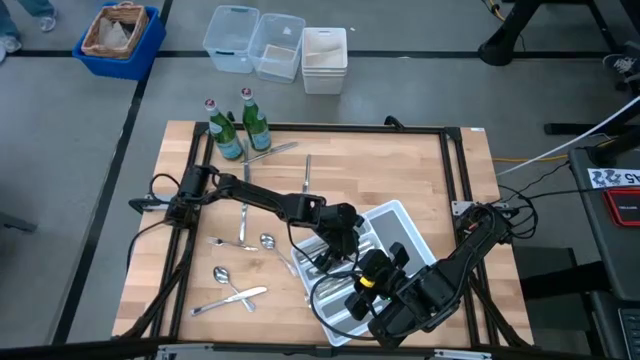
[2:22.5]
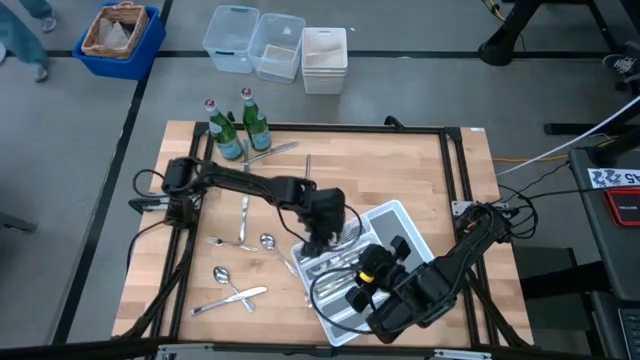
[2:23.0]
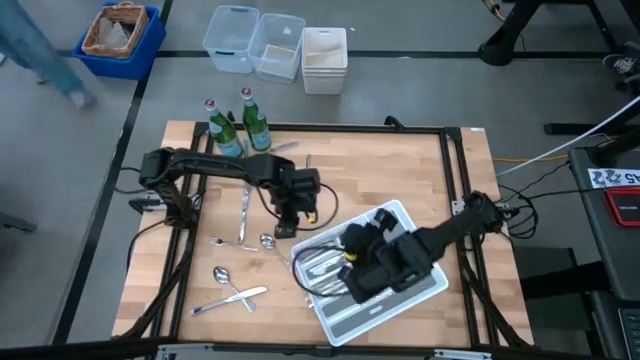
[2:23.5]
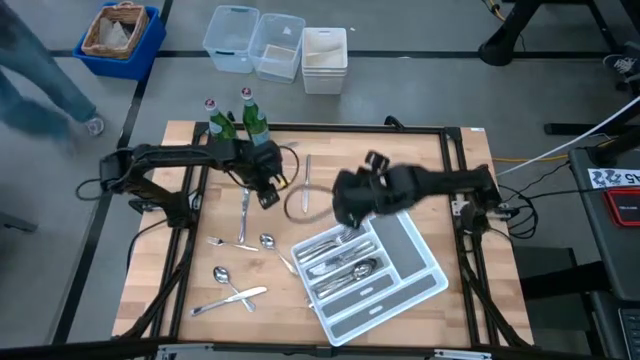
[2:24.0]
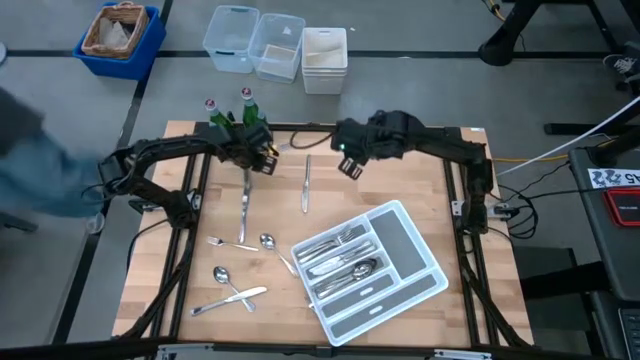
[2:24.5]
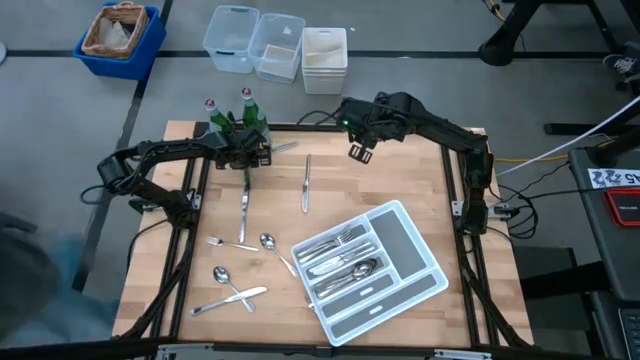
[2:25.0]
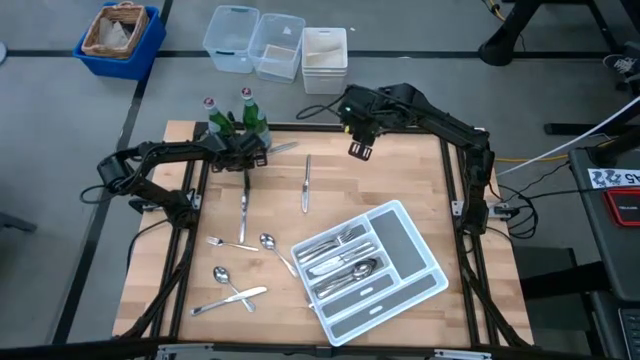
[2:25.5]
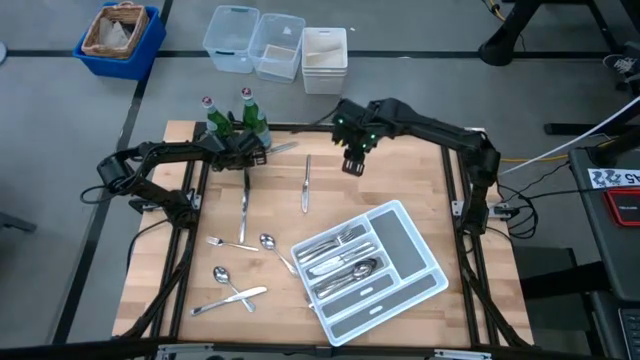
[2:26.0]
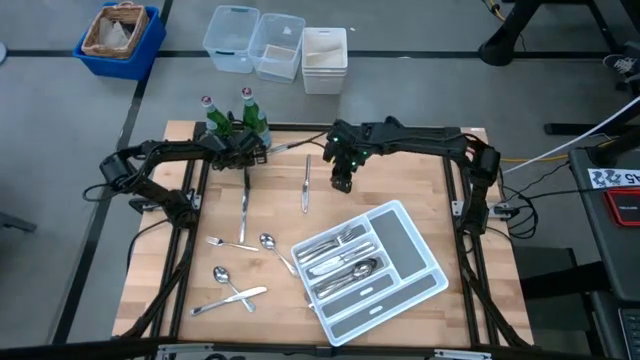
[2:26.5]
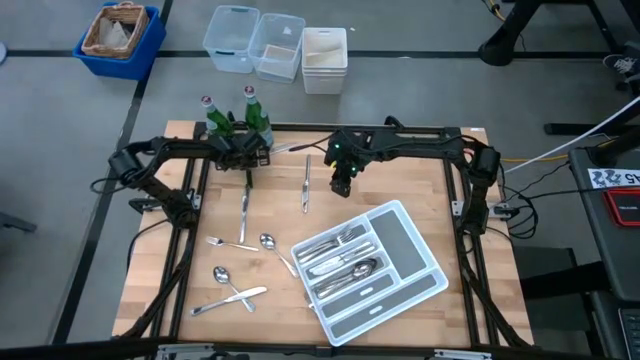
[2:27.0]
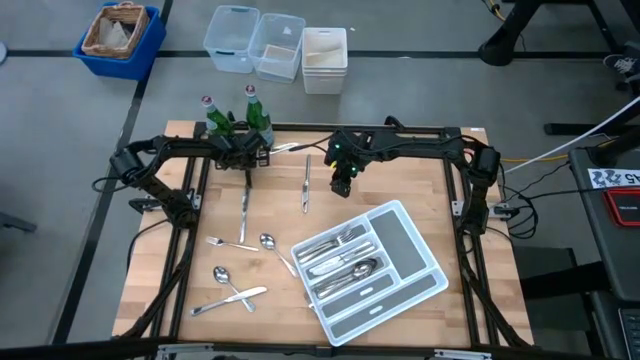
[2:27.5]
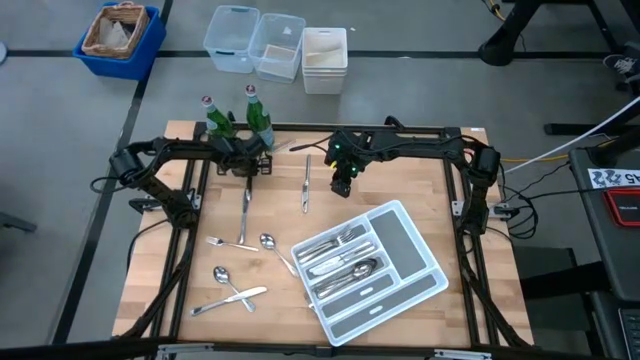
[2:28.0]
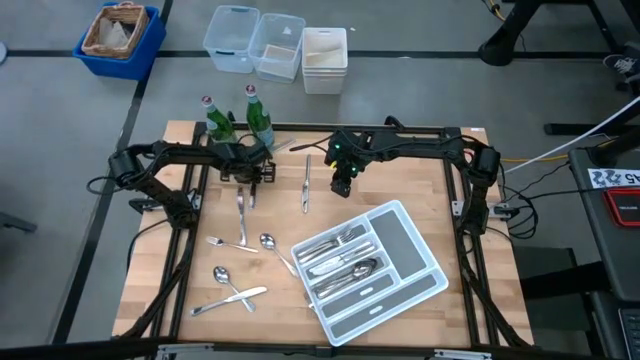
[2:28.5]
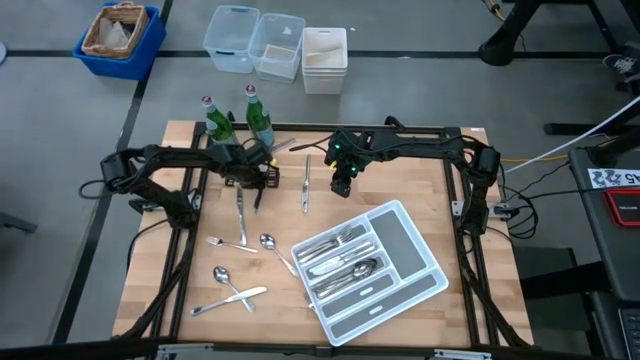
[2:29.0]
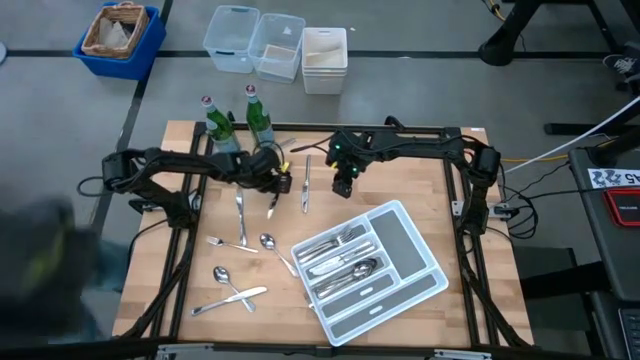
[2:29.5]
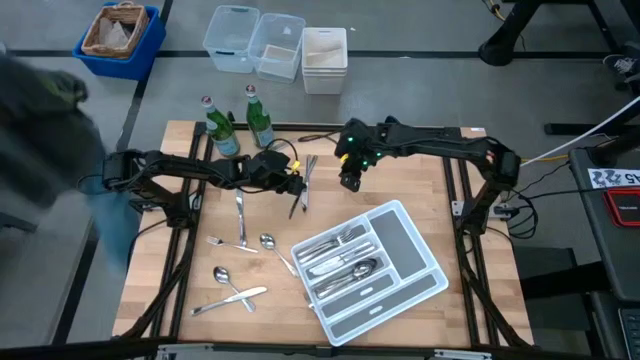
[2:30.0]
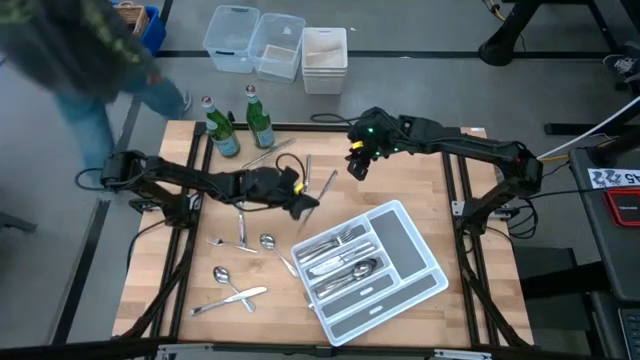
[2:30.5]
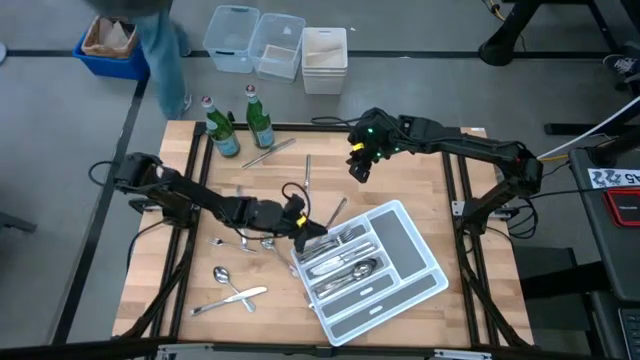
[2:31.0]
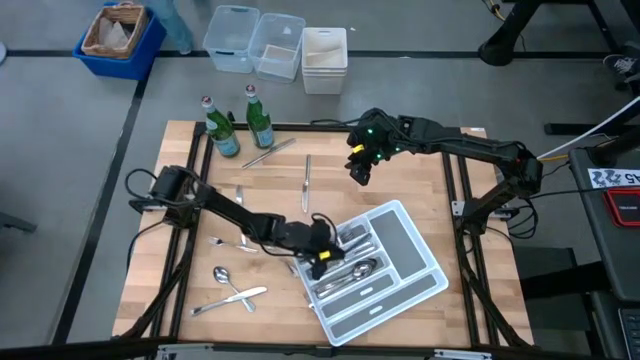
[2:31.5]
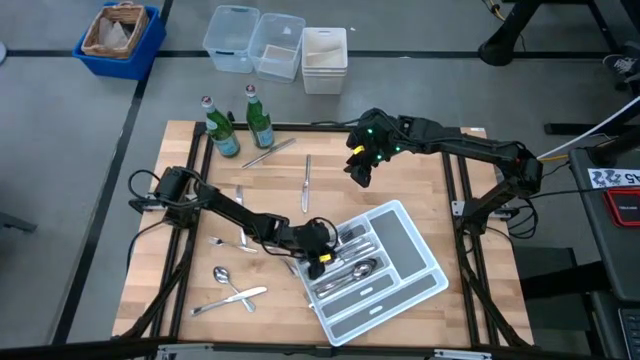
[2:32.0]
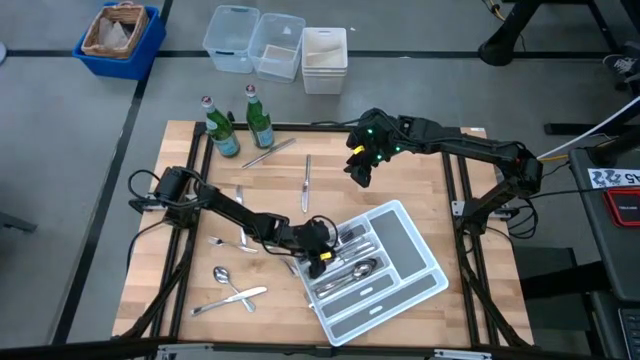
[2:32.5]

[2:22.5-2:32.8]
Task: Sort silverware
Put the silver table knife into the white silverware tray

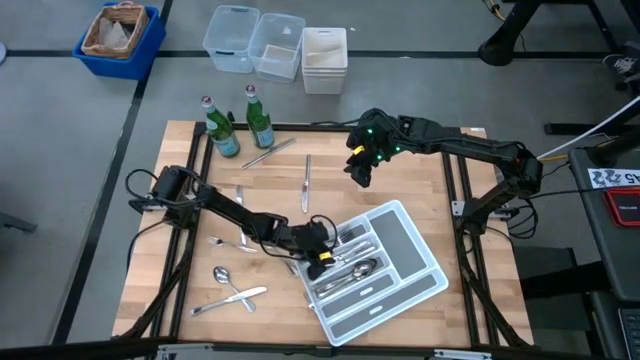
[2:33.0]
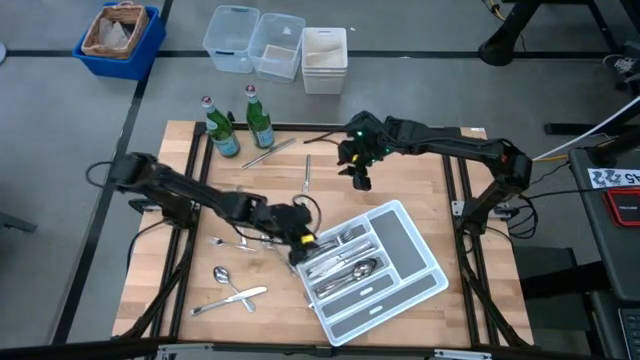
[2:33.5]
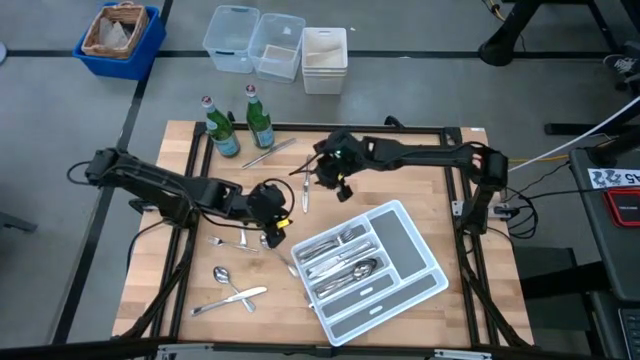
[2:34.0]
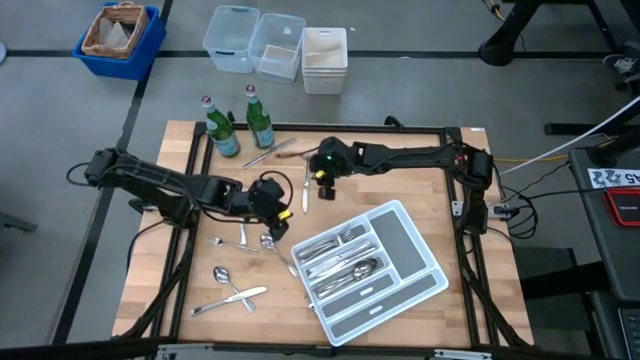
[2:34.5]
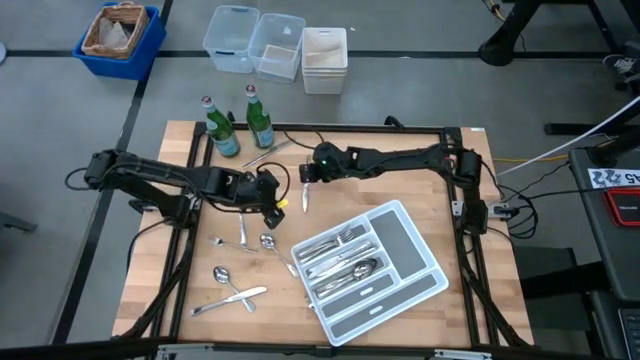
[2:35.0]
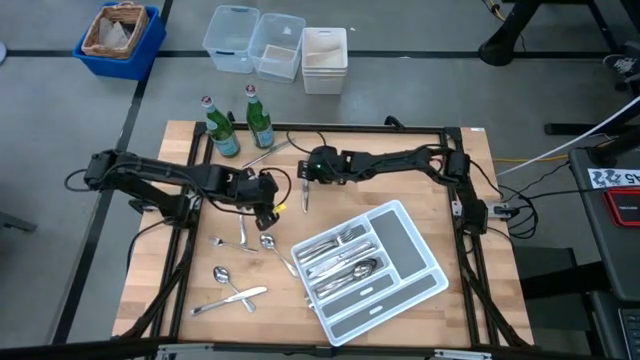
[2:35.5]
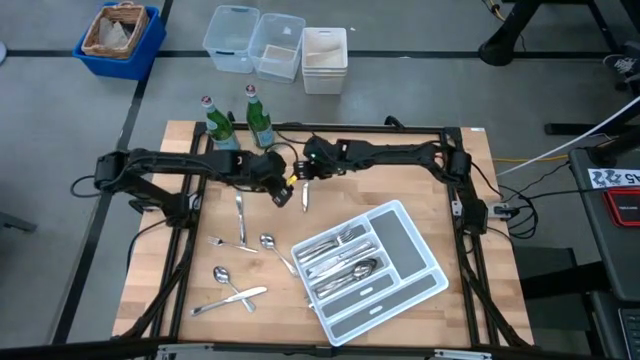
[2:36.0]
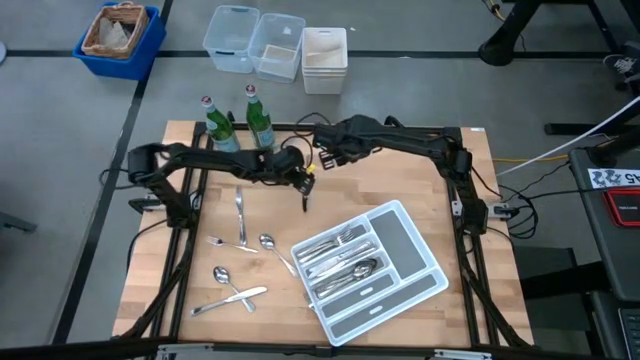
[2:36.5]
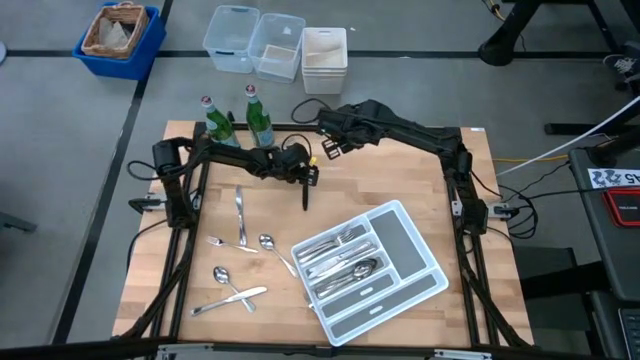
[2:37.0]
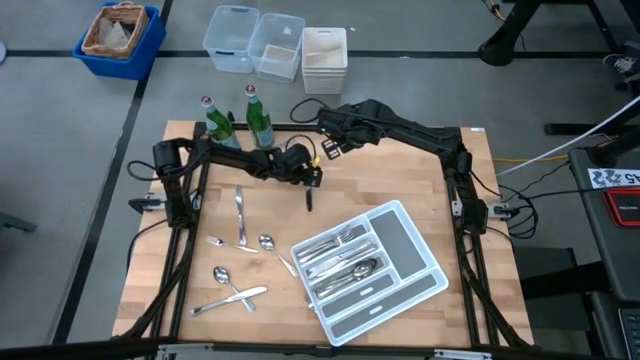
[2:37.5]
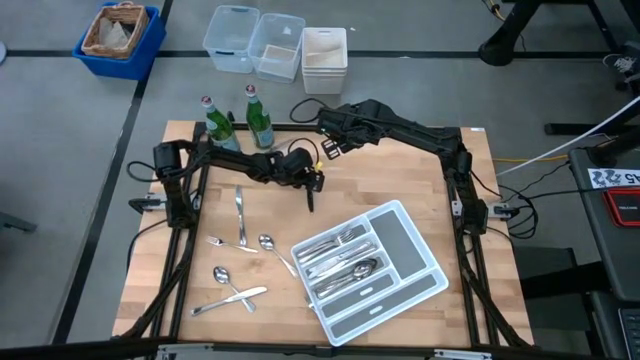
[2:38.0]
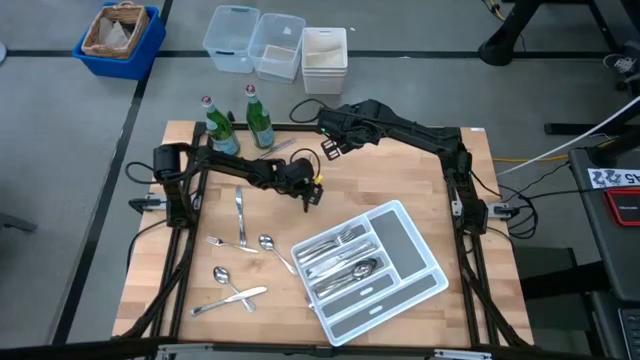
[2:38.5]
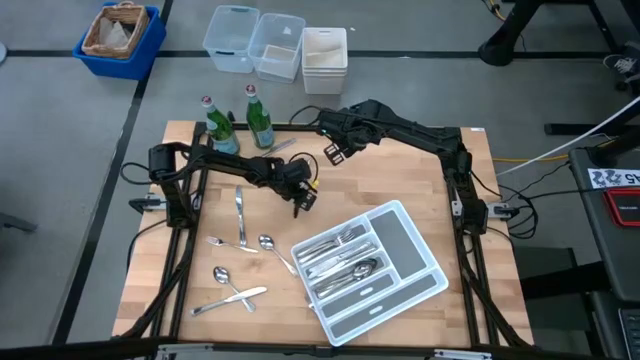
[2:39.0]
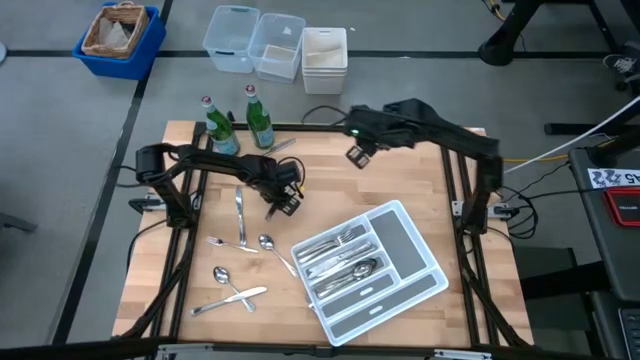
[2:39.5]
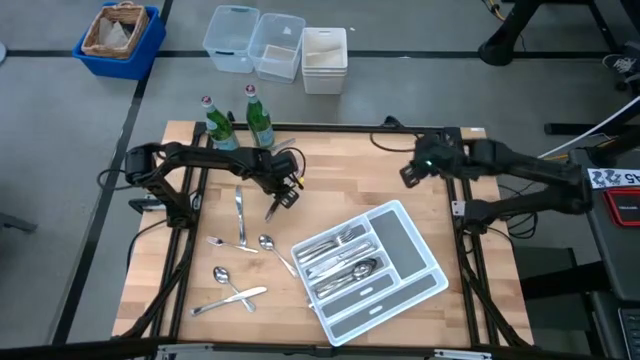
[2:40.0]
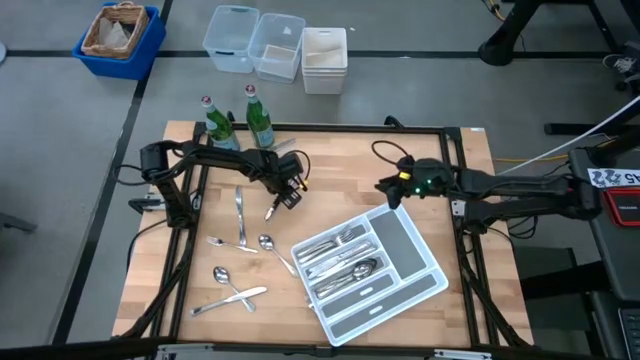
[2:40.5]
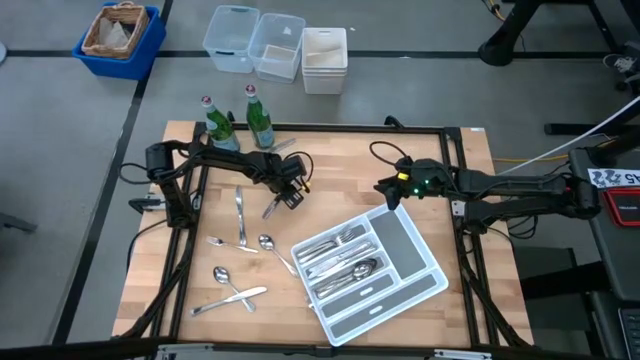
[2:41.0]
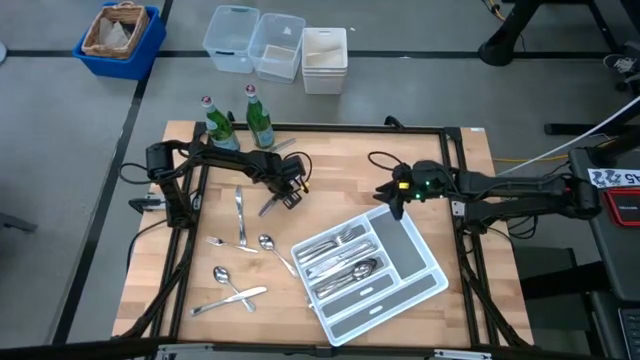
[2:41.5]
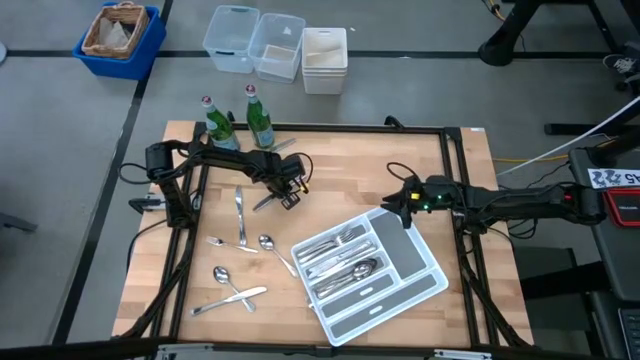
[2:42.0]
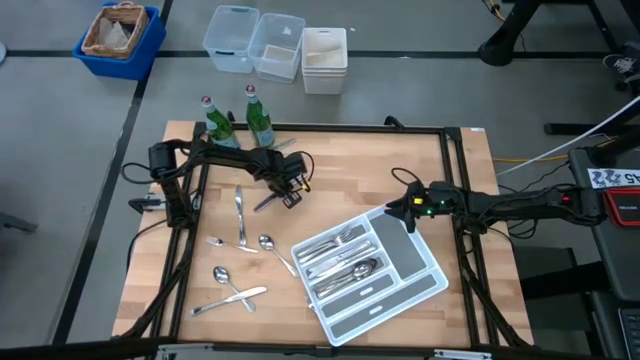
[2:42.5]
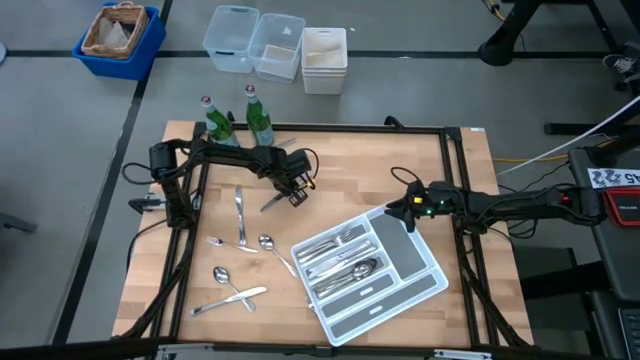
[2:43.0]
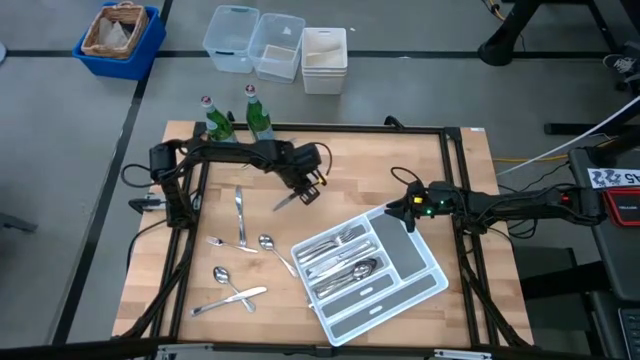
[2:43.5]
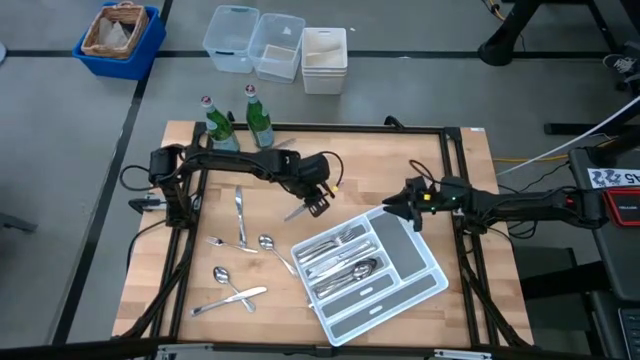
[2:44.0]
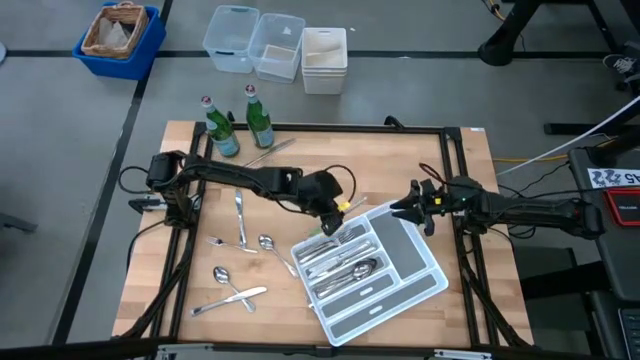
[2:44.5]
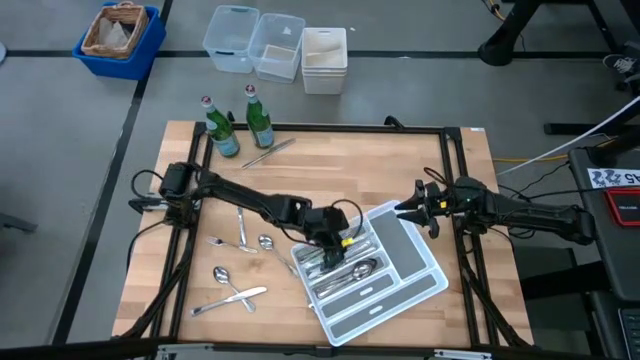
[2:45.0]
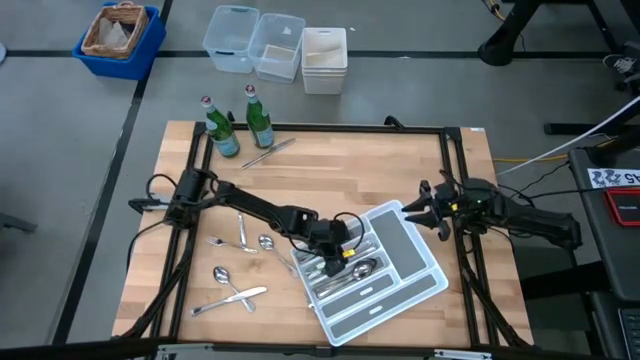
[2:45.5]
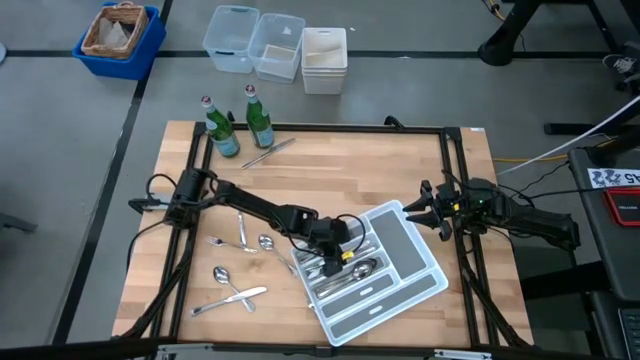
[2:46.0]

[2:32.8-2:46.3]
Put the silver table knife into the white silverware tray
